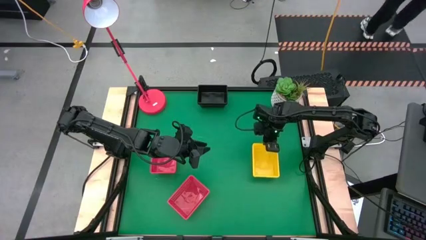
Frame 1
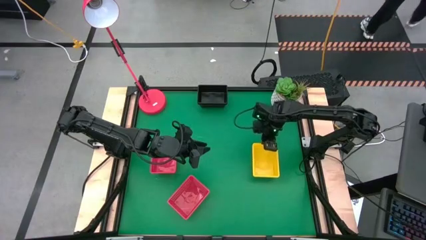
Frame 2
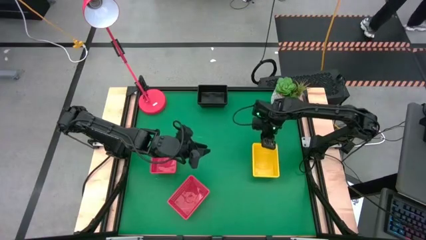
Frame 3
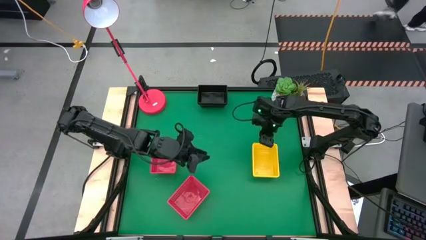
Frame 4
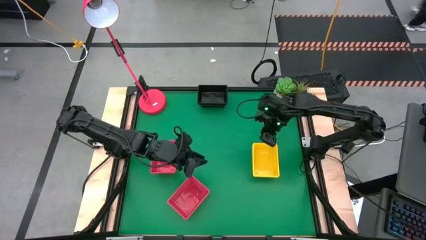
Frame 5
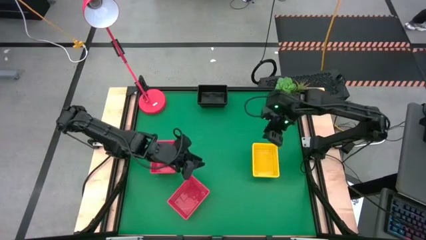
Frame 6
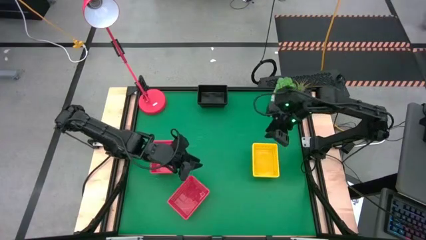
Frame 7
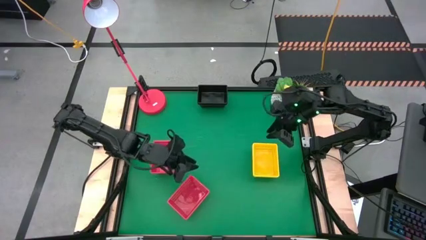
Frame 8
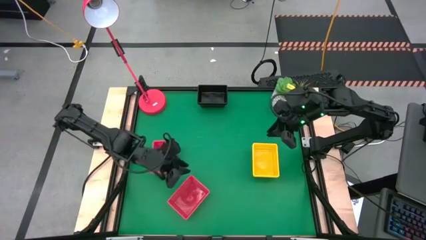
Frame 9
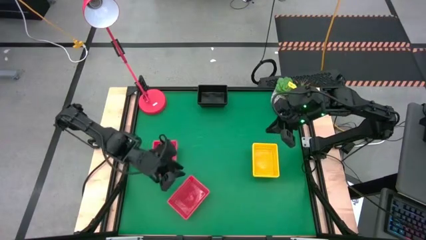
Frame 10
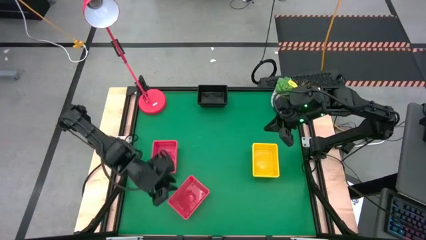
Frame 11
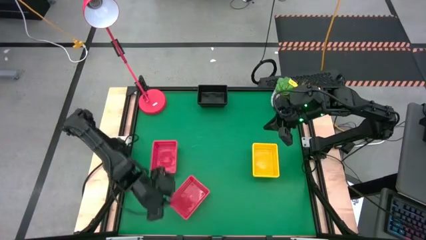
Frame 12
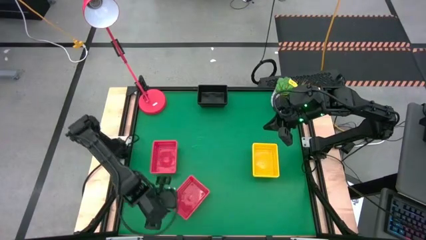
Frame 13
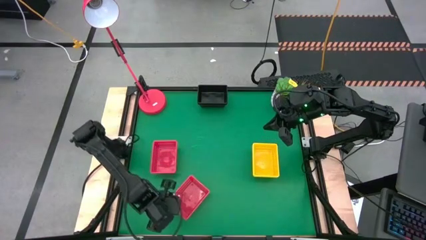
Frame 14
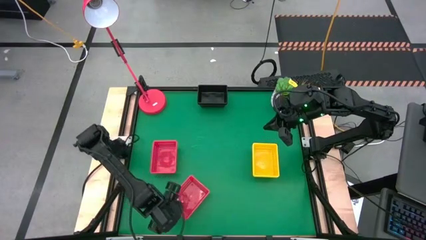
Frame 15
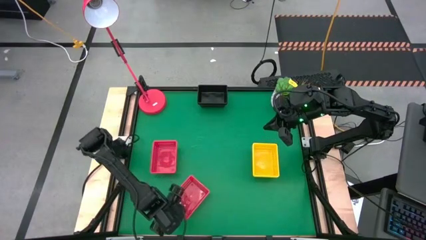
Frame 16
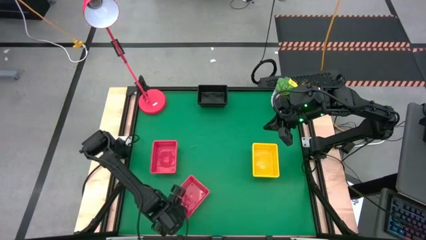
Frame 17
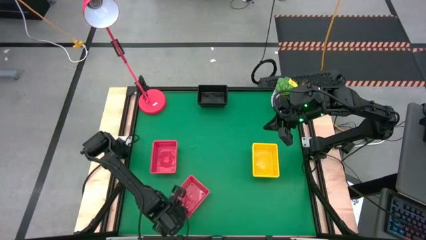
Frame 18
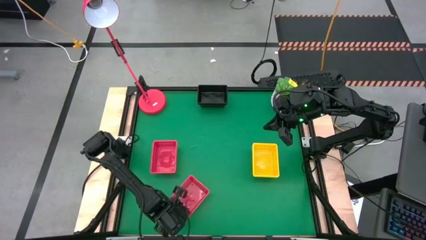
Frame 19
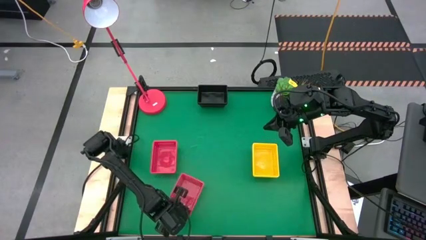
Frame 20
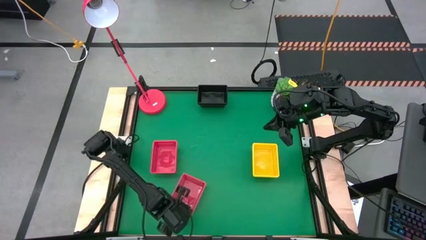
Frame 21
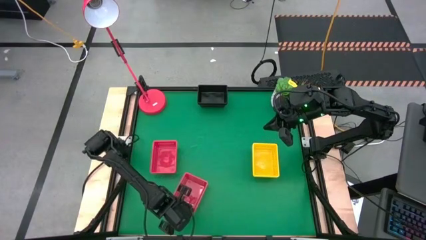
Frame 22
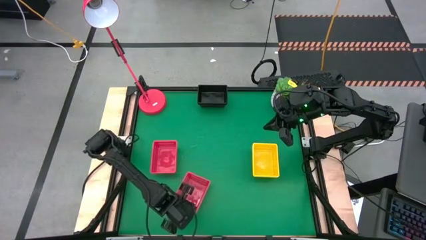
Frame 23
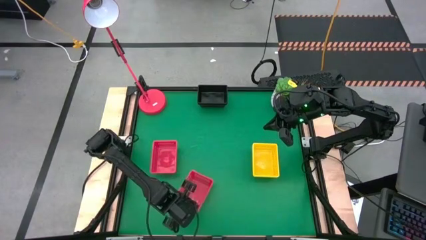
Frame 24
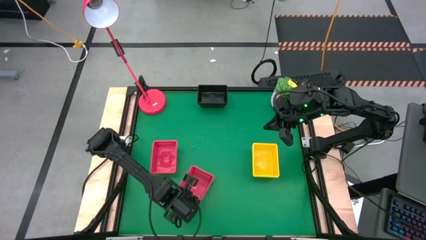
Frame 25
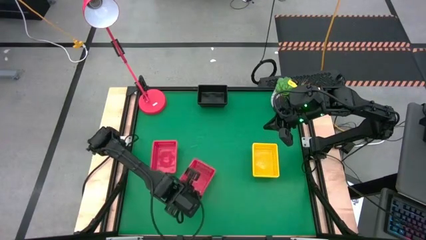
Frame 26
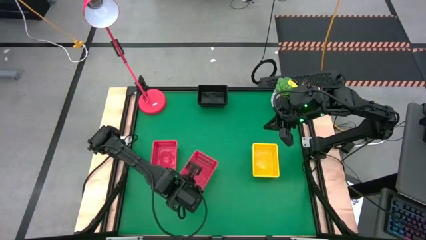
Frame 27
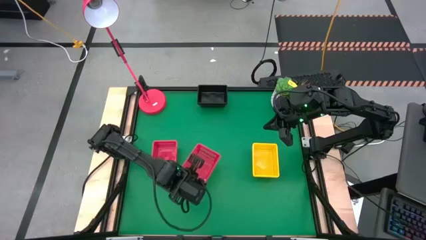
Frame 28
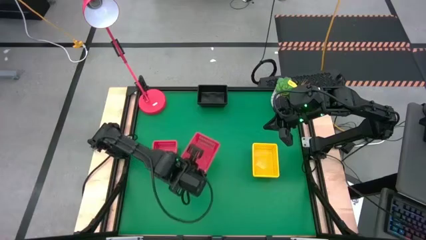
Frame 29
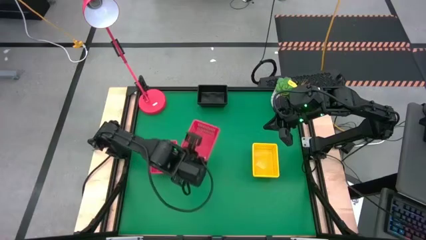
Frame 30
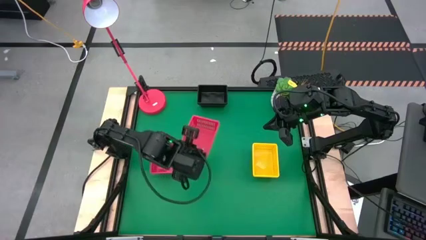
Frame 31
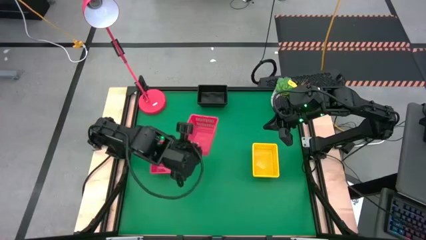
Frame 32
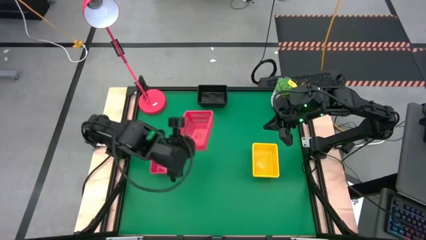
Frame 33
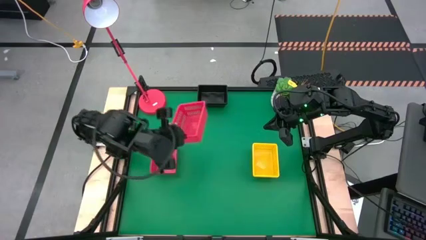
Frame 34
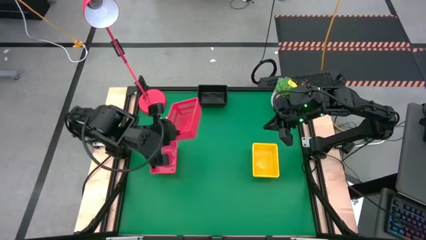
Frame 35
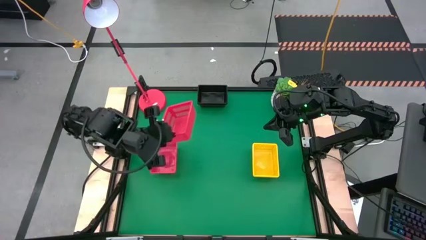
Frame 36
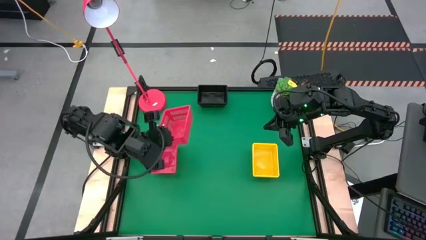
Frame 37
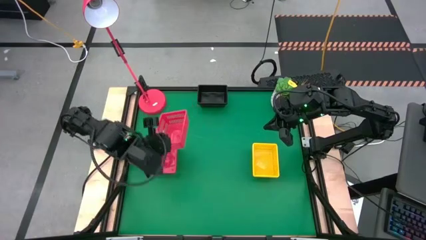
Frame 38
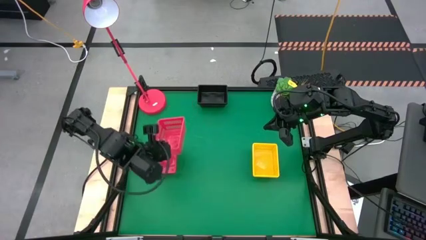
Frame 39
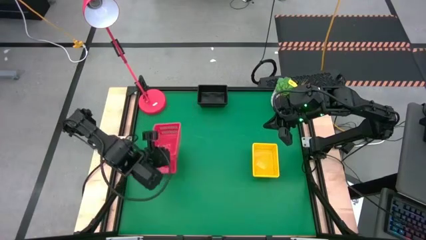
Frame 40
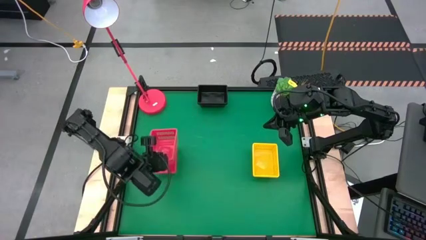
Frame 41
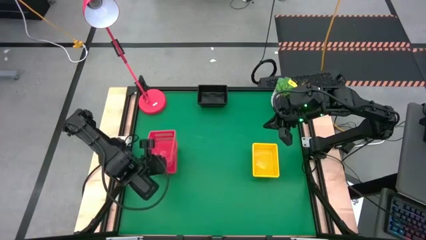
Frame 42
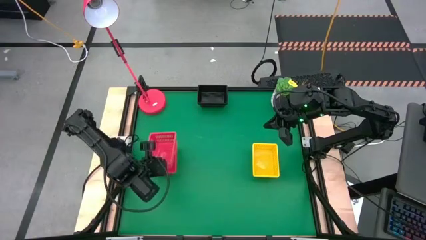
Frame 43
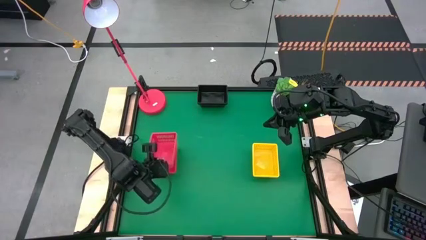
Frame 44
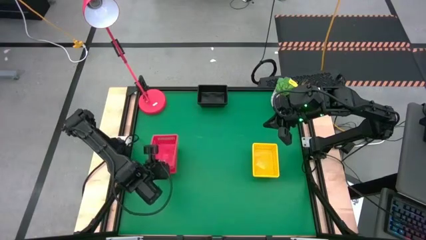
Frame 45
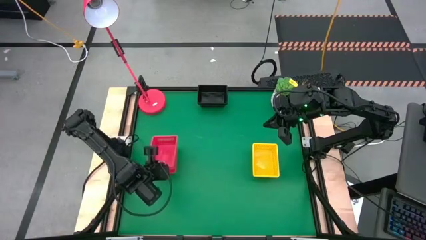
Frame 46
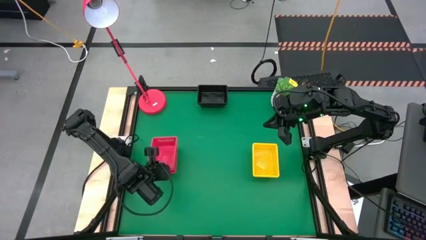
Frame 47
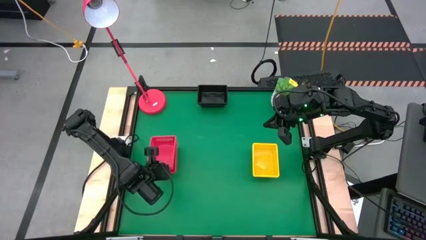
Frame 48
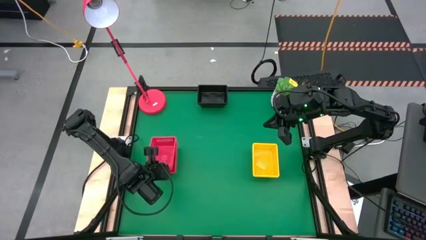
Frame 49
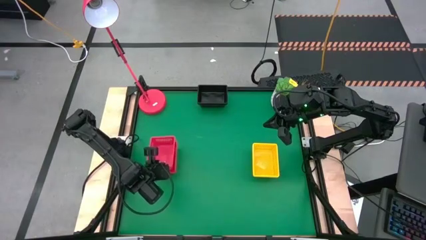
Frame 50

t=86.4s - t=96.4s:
Stack the bottom red bin on the top stacked red bins

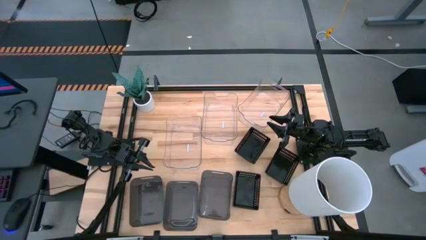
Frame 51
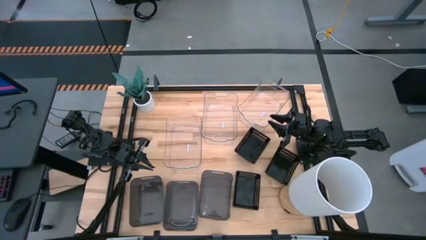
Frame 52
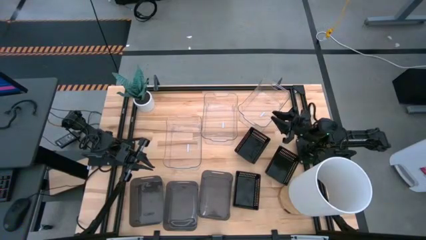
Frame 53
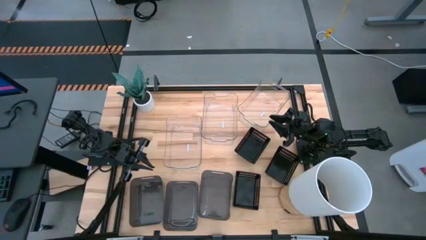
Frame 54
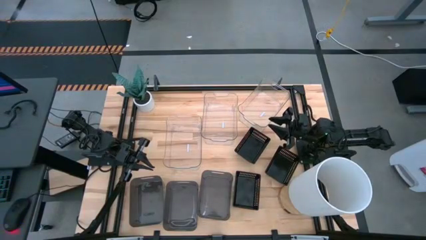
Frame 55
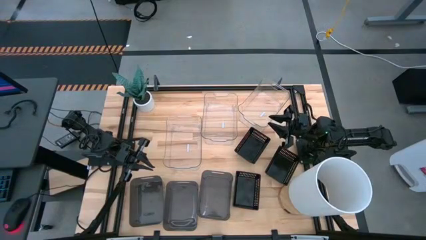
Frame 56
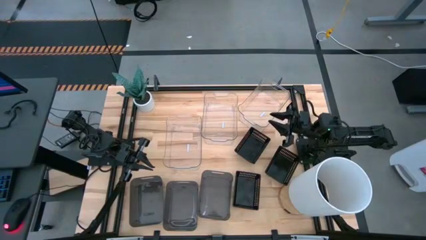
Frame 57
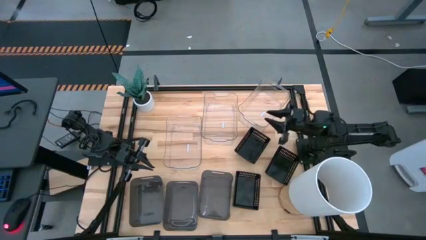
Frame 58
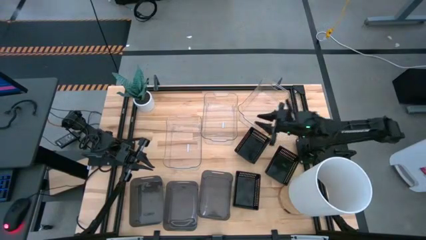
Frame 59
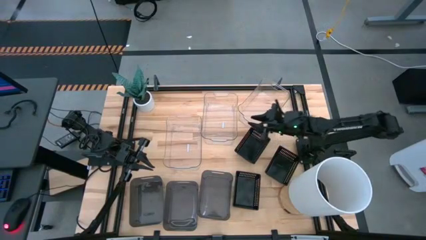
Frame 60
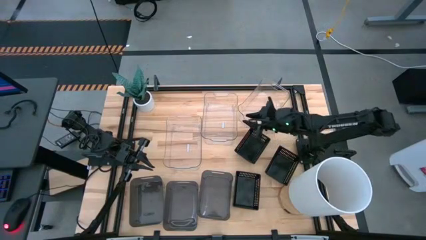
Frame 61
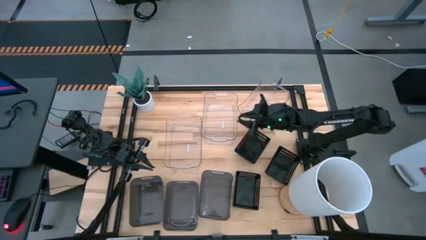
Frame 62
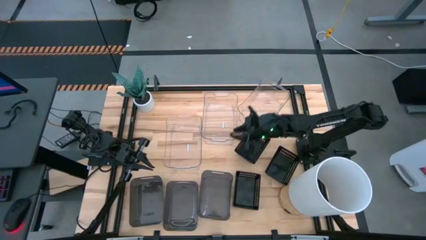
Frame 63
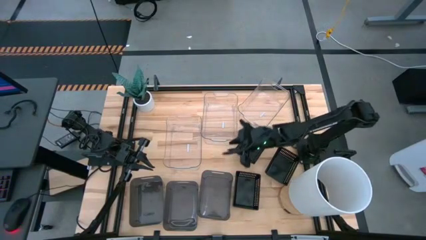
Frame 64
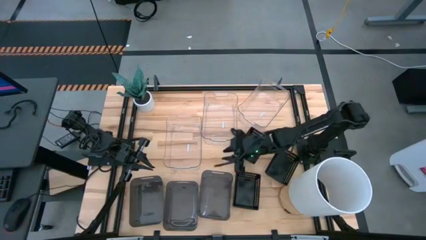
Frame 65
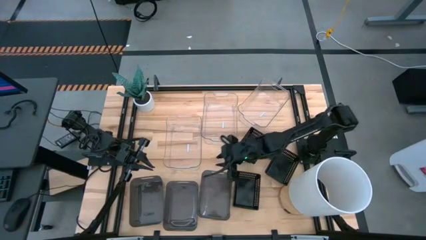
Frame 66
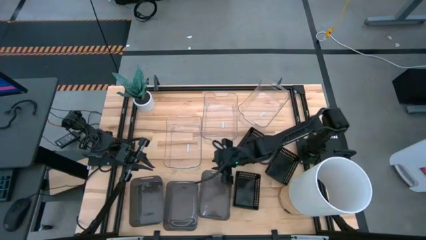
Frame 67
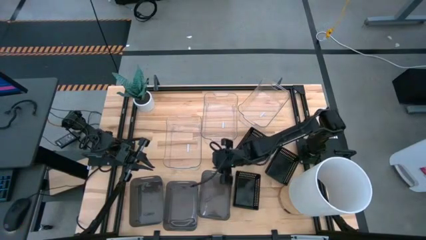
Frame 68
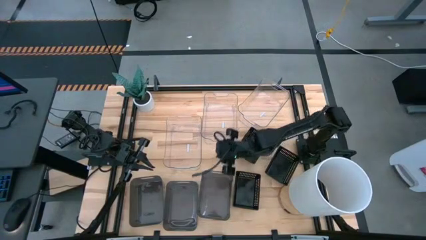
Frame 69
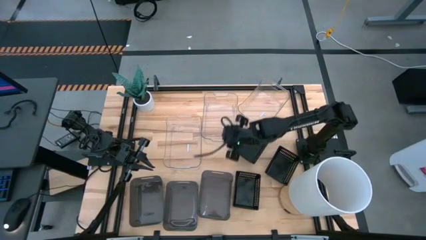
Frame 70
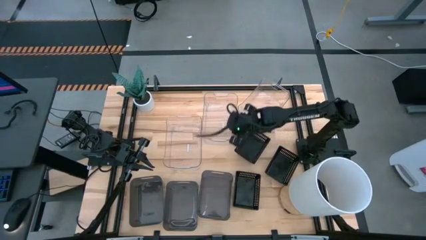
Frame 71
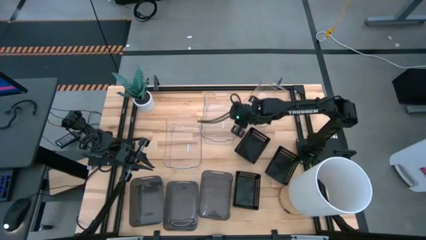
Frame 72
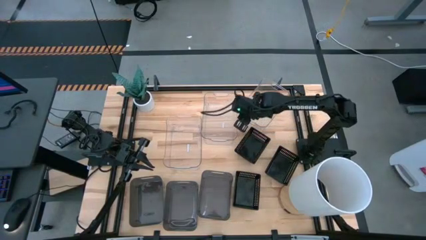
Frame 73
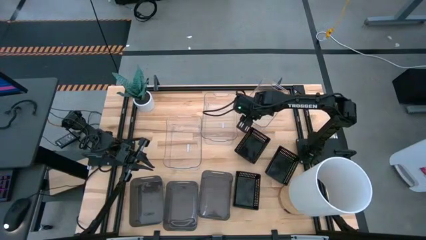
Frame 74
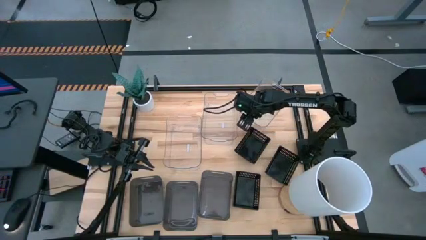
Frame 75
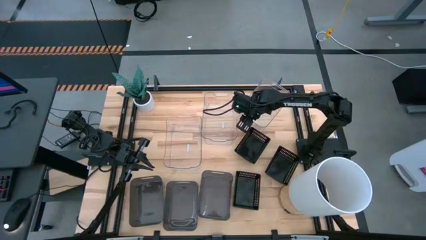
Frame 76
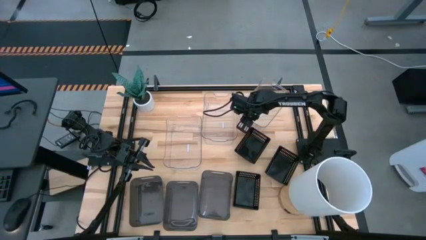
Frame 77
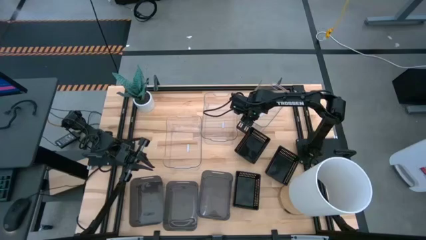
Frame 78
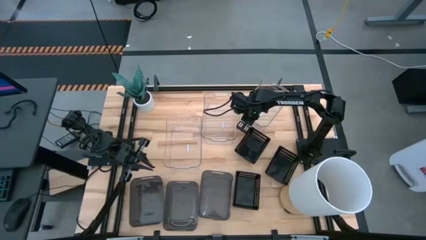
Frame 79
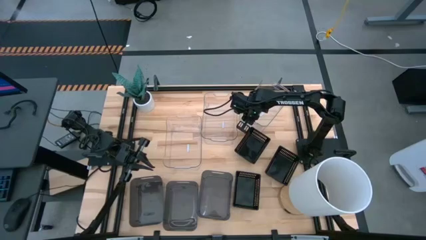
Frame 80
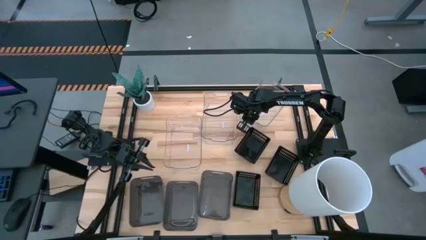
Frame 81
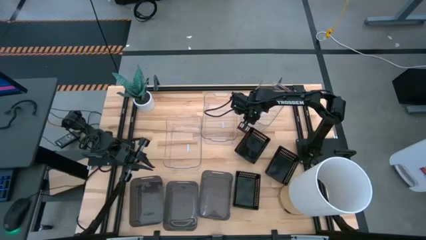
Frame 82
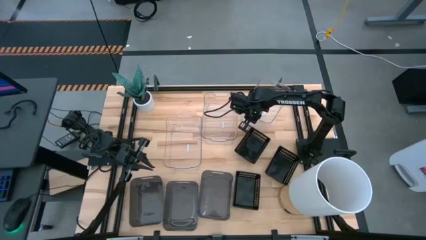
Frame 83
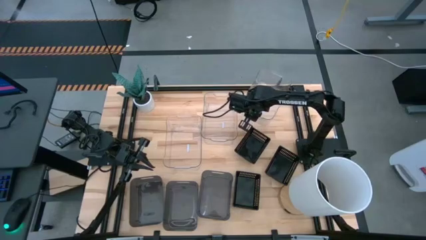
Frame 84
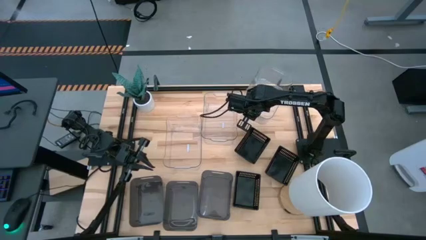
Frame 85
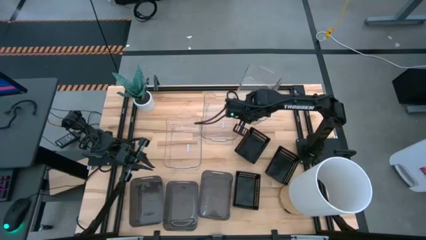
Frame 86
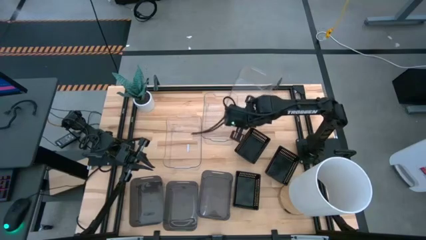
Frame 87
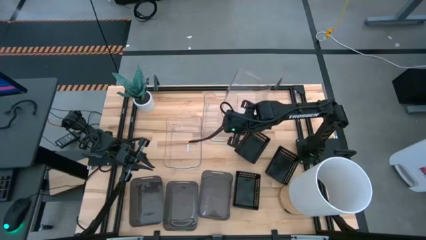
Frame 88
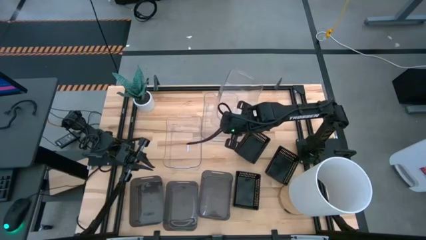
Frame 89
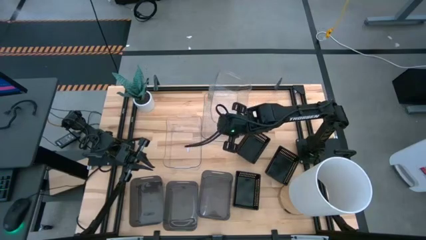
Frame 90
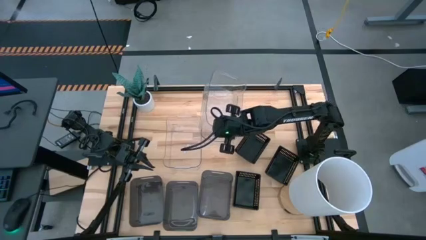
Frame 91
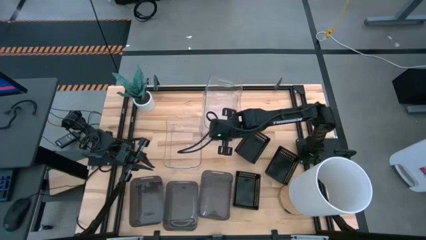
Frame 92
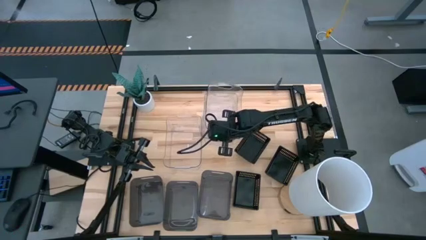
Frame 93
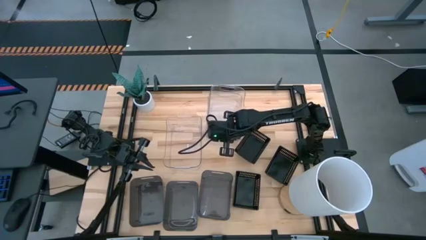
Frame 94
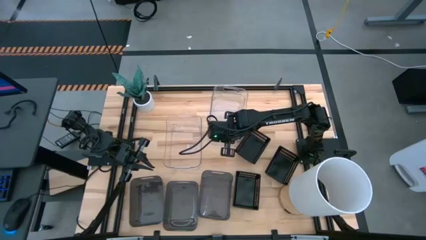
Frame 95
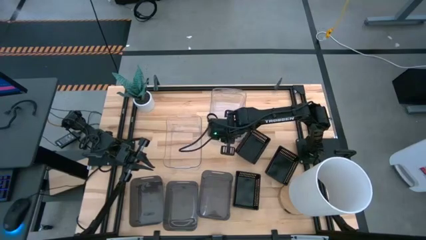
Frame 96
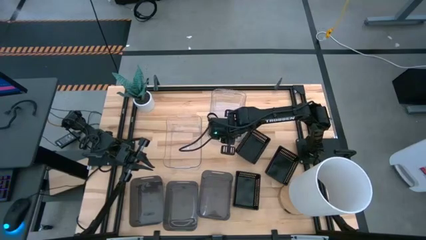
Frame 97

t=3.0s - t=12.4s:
Stack the right transparent bin on top of the middle transparent bin
